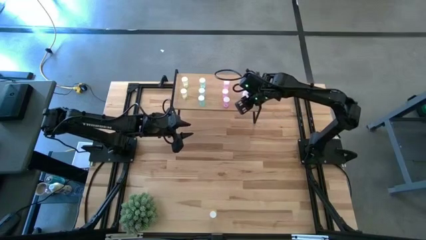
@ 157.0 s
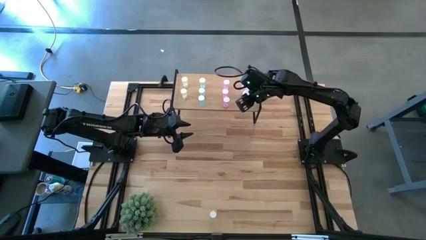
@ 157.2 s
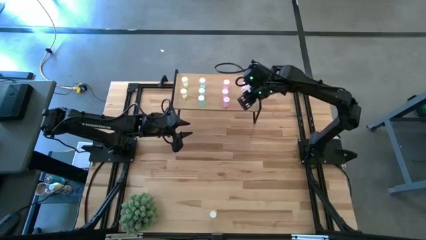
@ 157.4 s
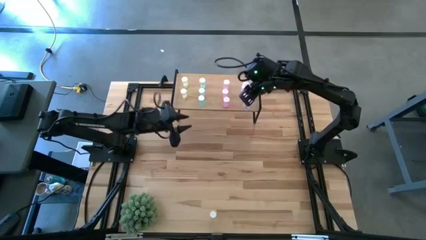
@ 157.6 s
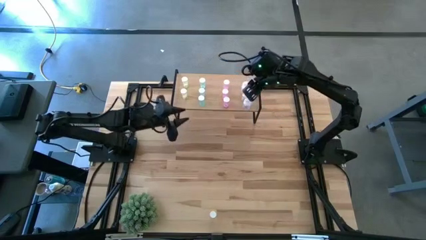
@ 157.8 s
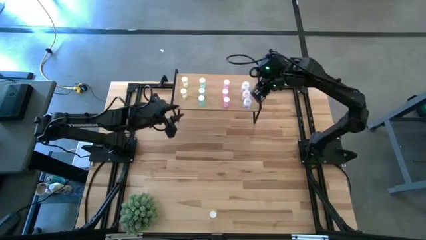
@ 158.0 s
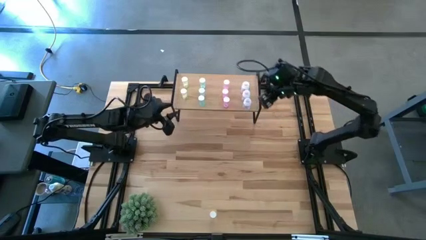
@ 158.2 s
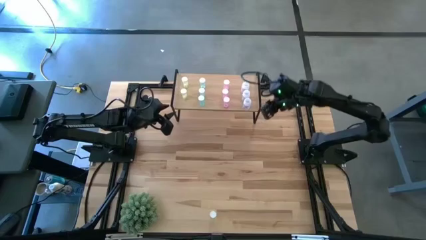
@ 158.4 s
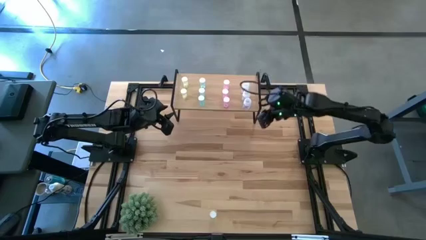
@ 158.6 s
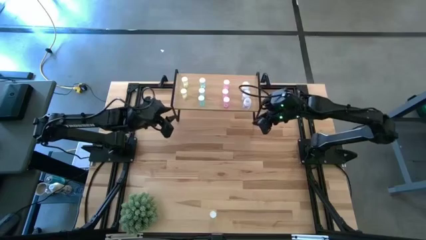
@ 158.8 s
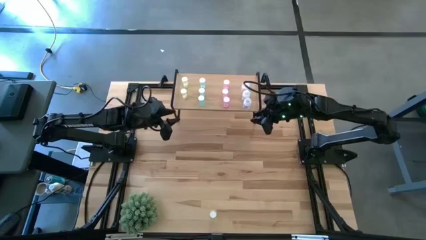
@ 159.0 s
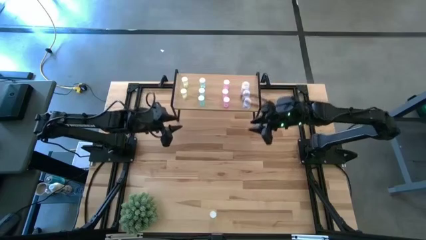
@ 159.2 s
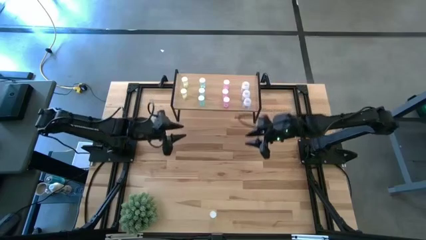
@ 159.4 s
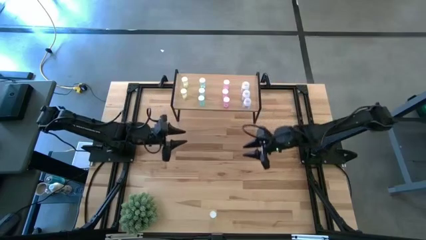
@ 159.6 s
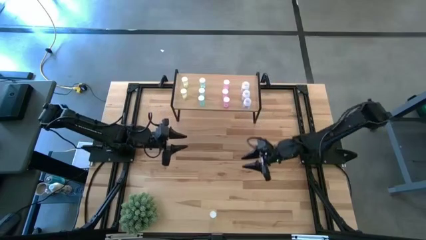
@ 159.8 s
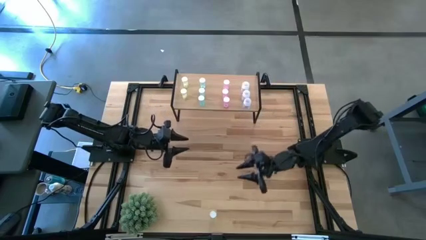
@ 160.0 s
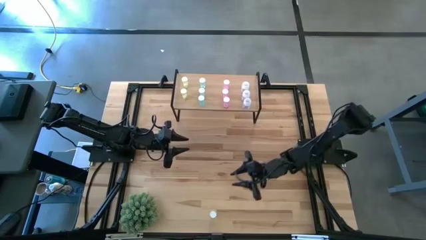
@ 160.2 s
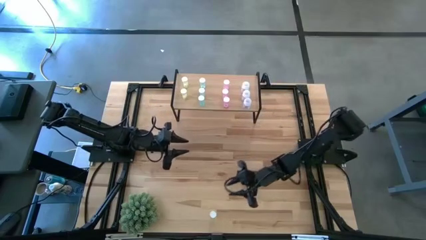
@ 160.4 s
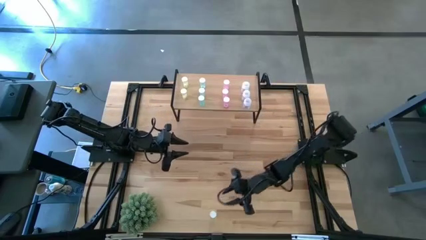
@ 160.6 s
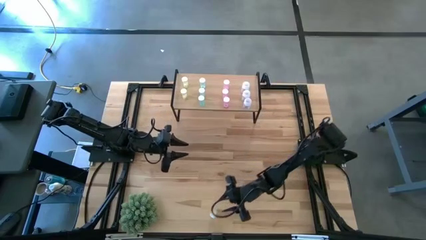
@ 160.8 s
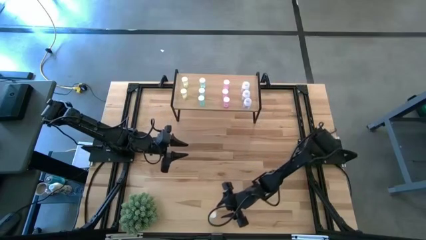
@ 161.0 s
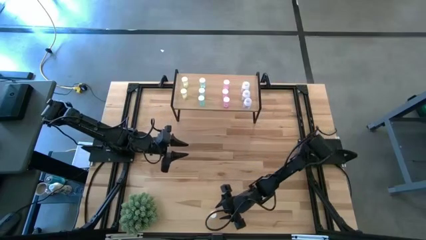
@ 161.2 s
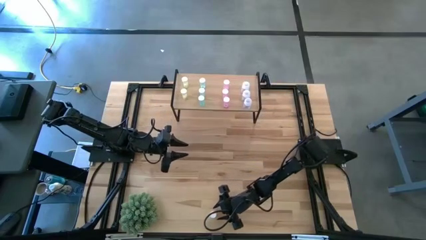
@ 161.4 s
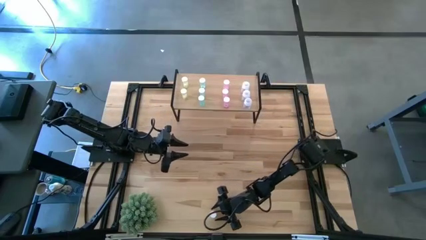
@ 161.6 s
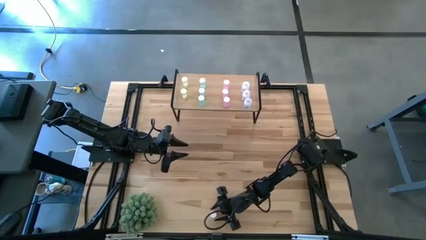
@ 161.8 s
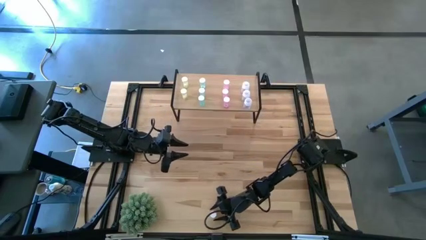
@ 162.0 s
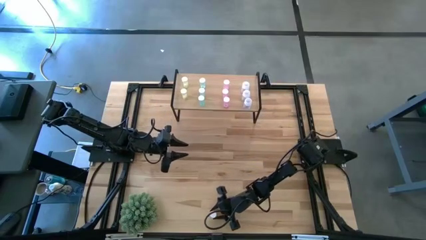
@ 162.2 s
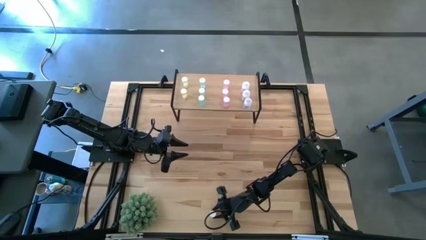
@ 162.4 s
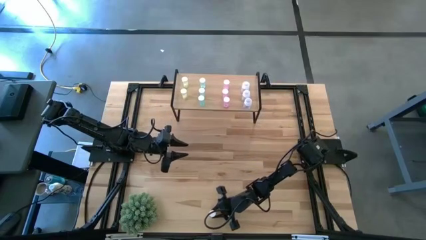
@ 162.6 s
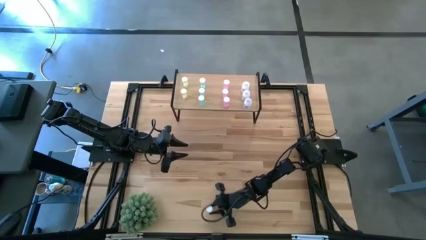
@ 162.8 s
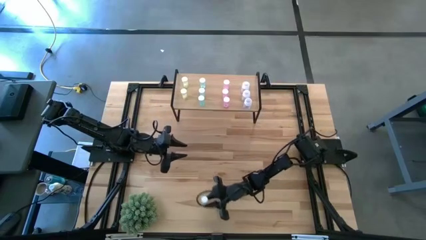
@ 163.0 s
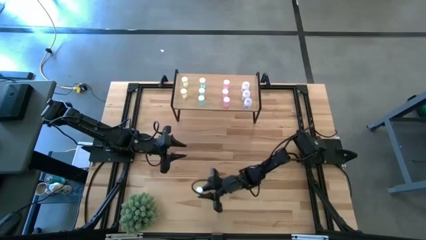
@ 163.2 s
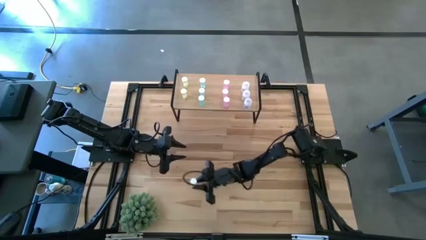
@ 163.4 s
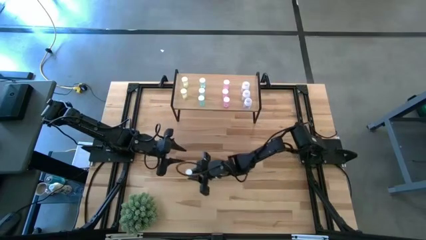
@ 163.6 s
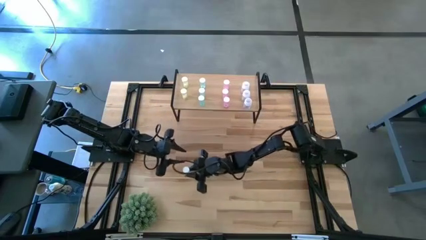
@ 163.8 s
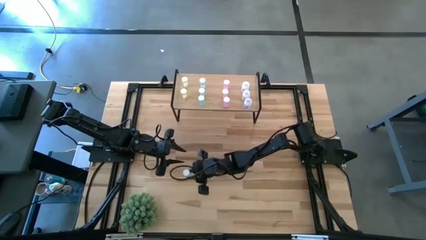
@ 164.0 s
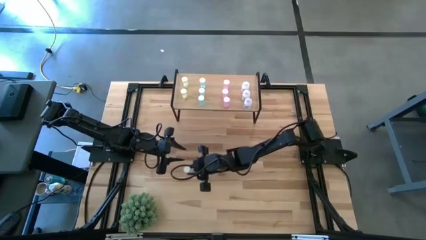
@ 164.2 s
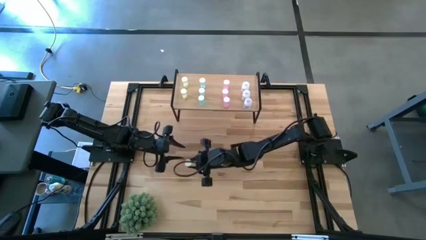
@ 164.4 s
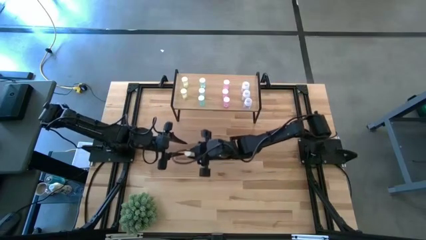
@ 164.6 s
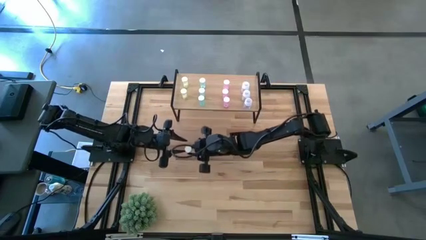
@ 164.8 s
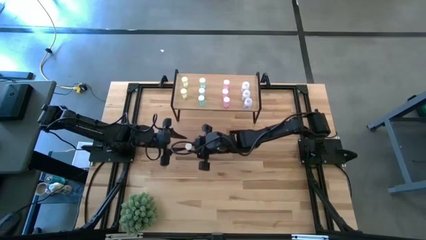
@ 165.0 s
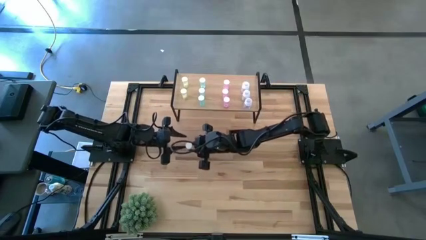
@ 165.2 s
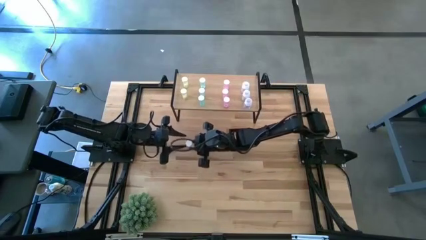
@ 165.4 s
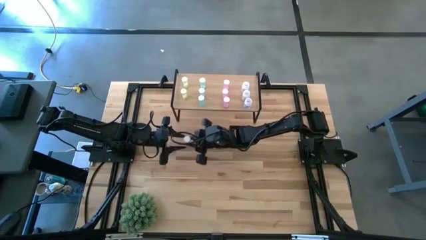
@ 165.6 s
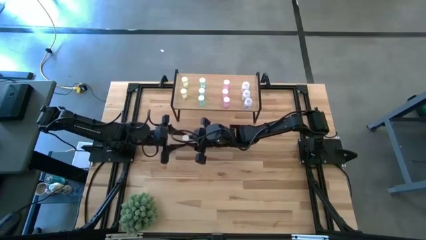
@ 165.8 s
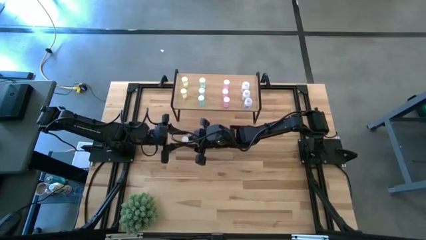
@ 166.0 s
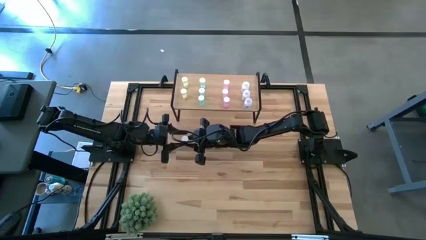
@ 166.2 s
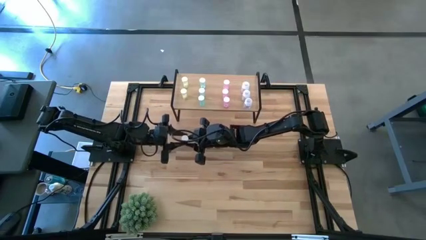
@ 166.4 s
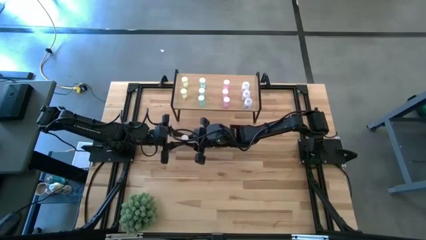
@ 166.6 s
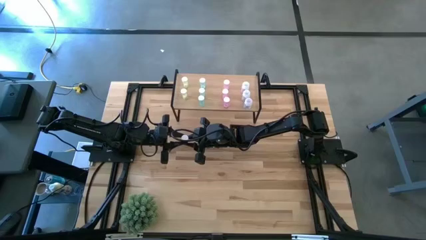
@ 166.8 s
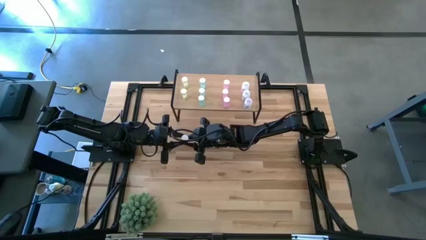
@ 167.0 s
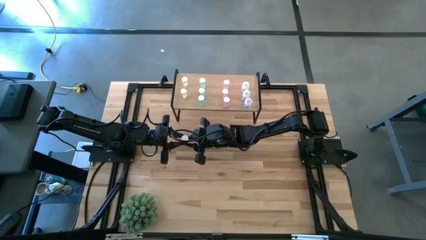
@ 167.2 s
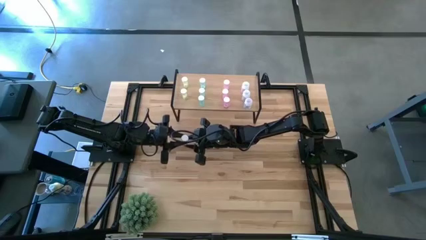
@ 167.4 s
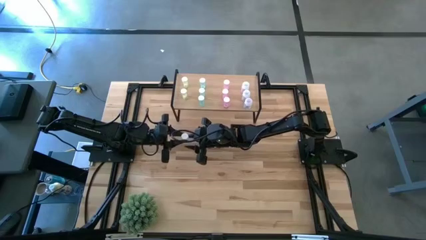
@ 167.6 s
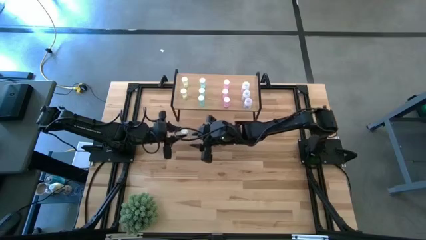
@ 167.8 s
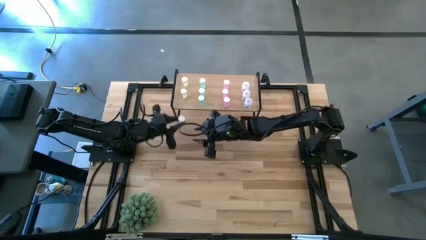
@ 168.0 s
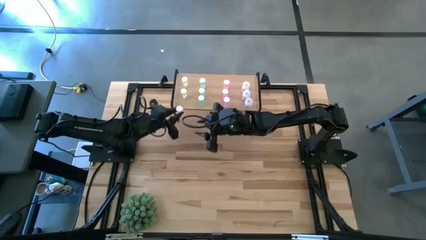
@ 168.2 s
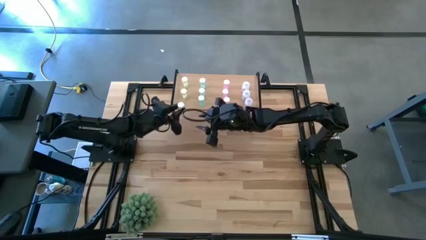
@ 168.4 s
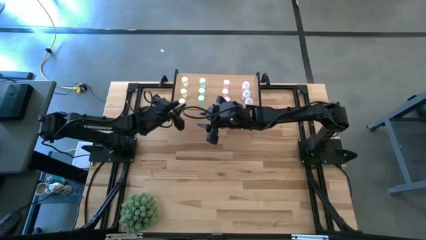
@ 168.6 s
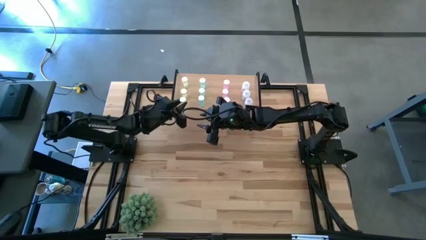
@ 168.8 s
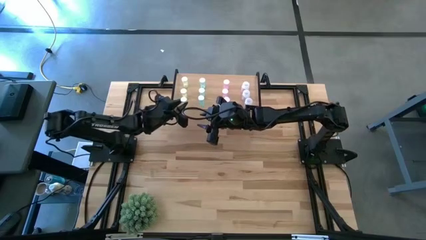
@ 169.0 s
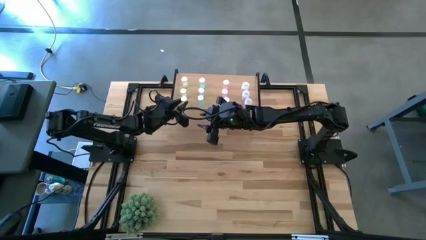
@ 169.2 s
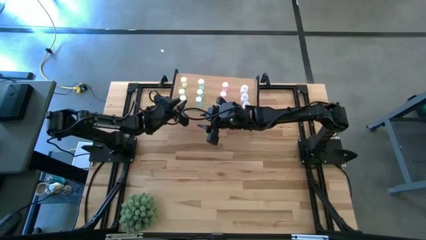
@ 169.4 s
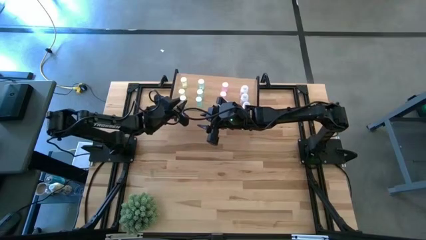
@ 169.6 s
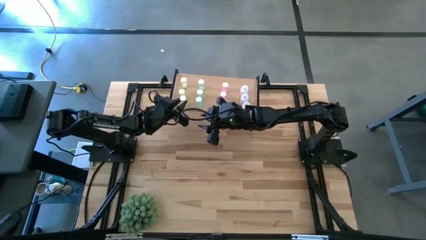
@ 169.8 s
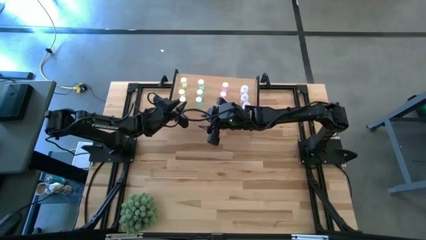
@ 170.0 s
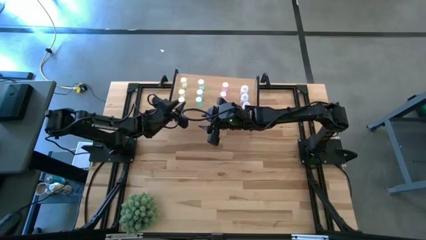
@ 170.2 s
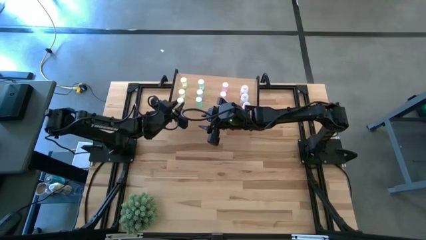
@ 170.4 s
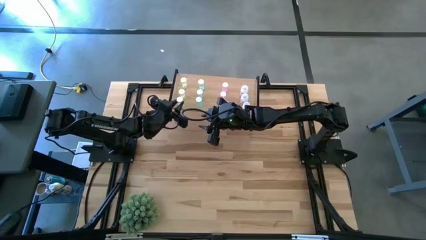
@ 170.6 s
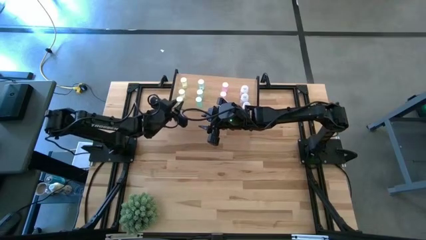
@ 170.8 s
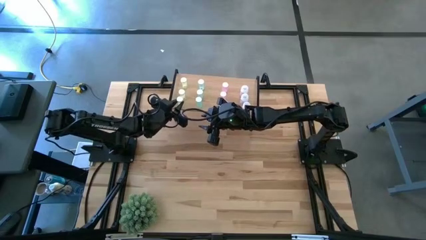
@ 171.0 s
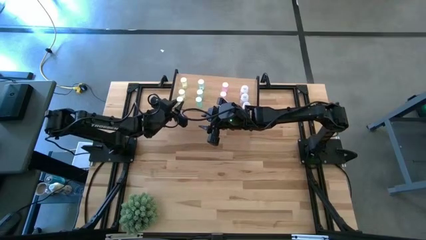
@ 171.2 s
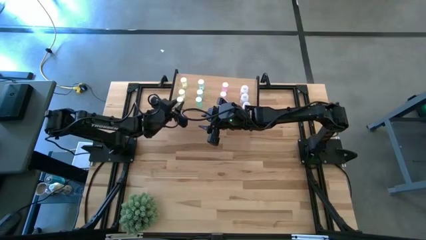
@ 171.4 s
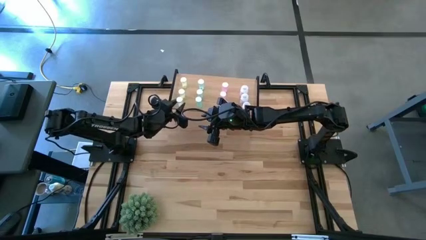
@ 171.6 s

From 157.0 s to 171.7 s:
Task: Pick and place medicine bottles onto shelf by color
Put the yellow pill bottle and align it with the other yellow pill bottle on the shelf
